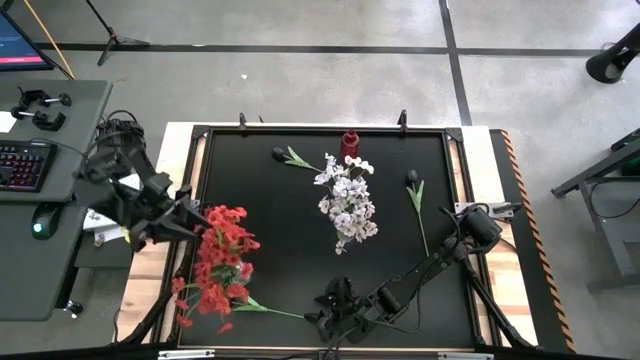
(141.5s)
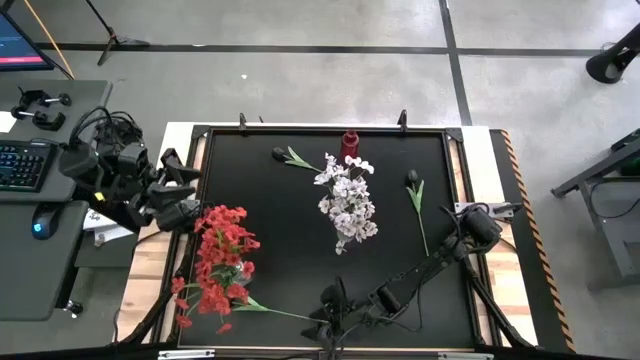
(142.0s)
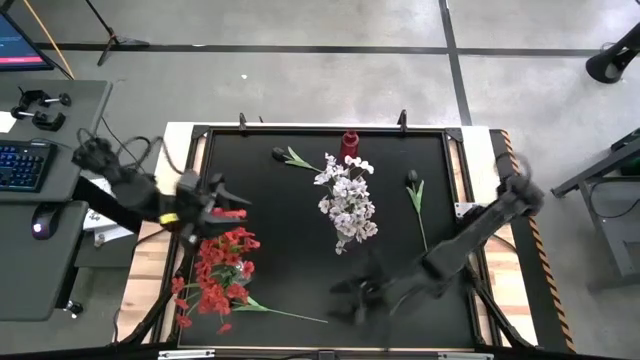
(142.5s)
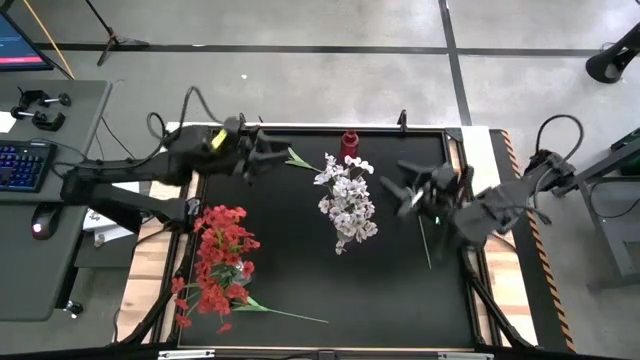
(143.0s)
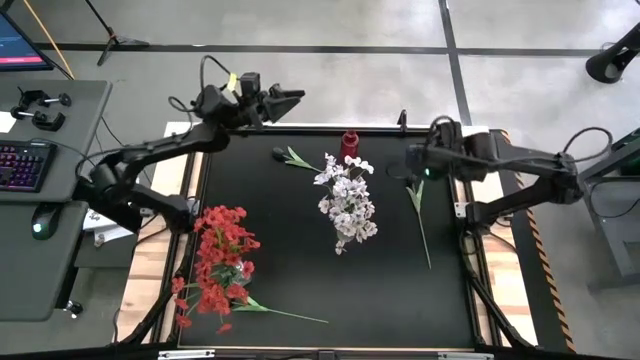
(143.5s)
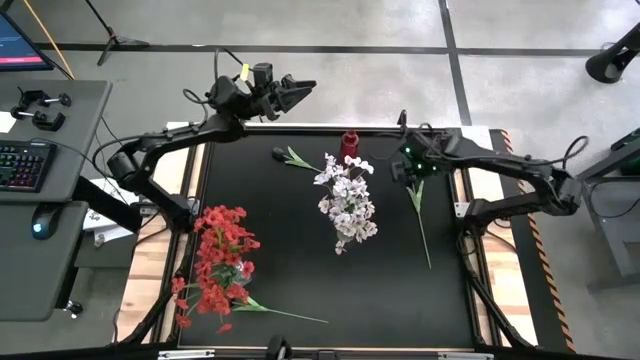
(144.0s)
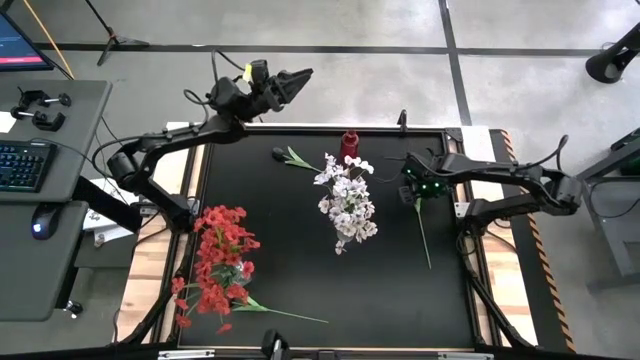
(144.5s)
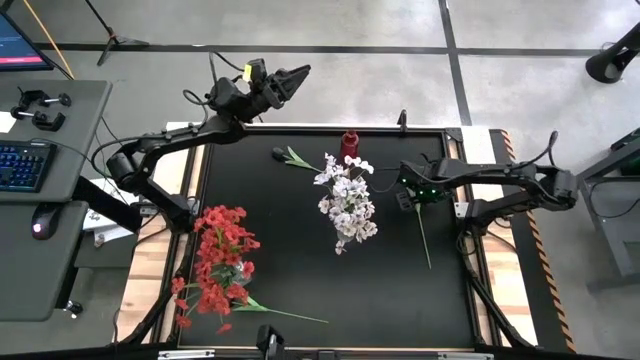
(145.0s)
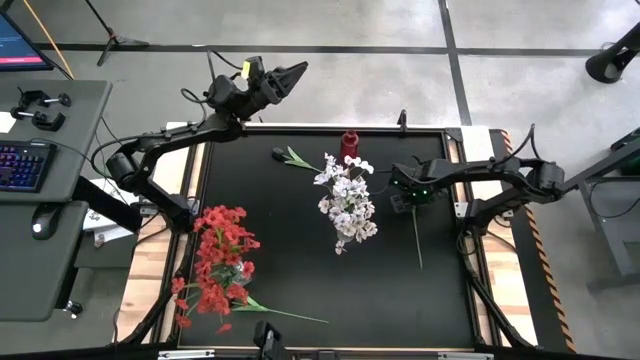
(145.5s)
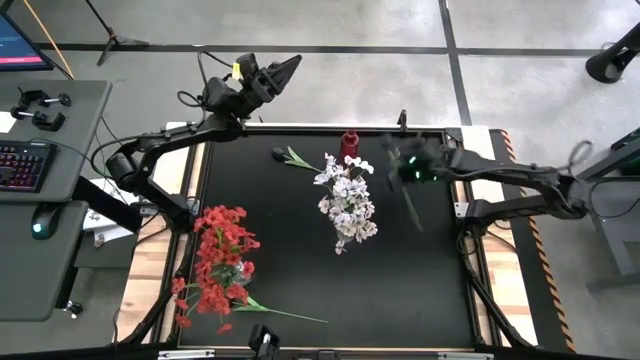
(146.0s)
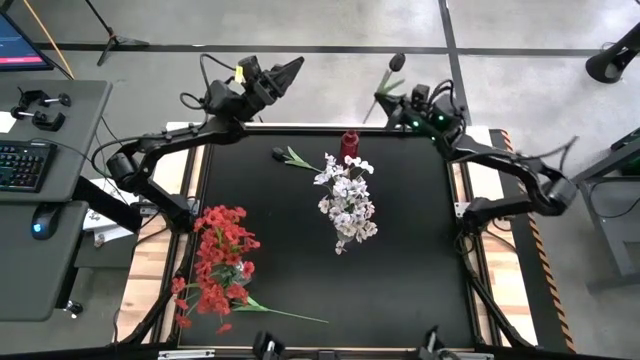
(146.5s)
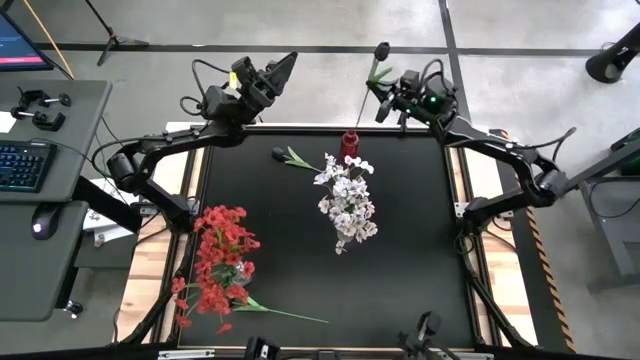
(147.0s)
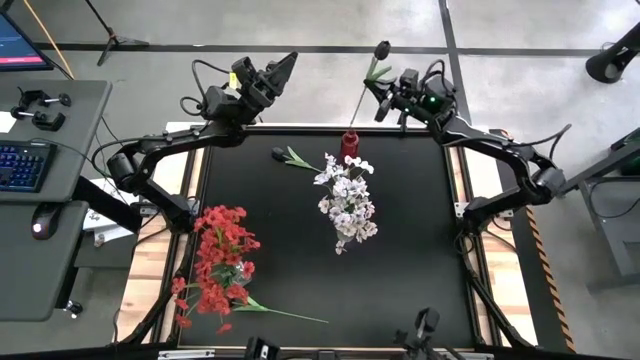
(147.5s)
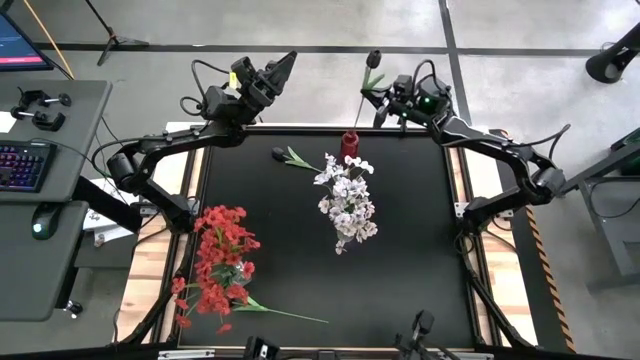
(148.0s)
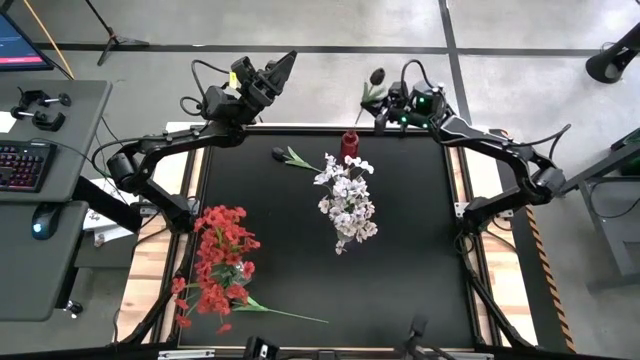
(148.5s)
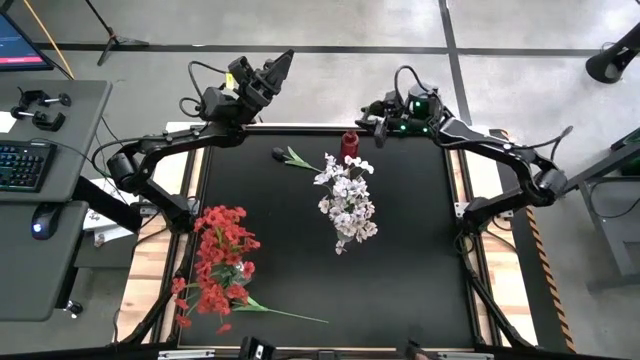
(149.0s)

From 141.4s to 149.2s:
Task: Sort flowers into vase by color
Put the top right black tulip into the red vase

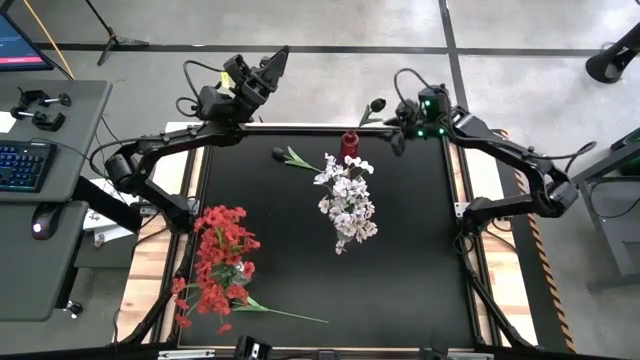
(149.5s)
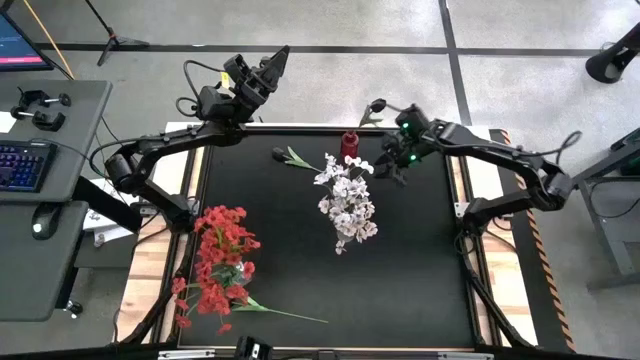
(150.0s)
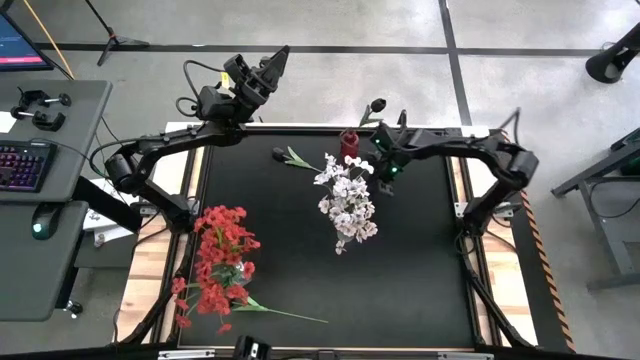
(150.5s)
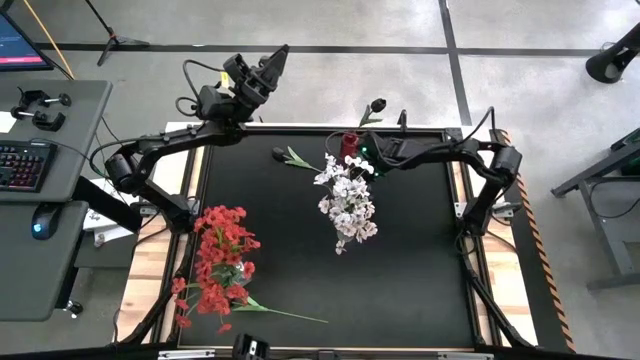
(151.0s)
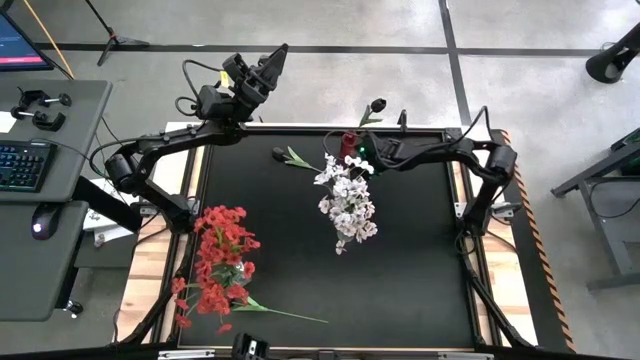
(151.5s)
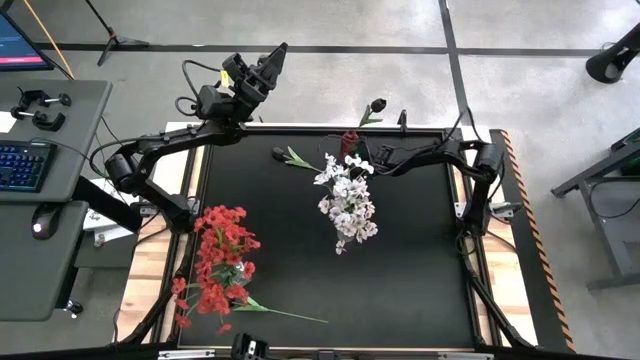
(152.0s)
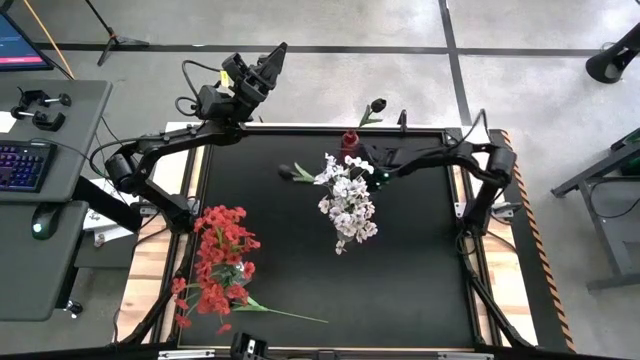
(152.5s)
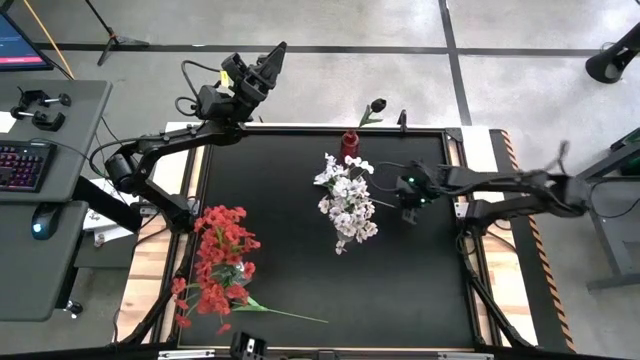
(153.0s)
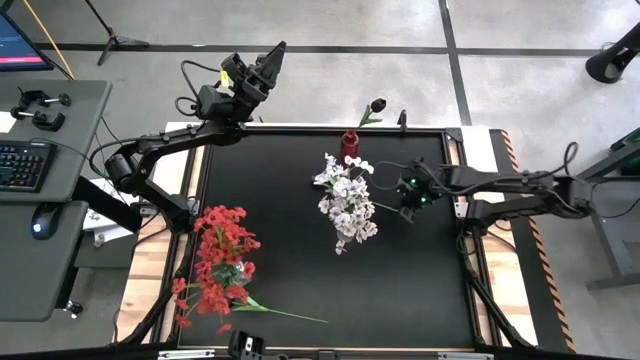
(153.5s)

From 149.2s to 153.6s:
Put the top black tulip into the red vase

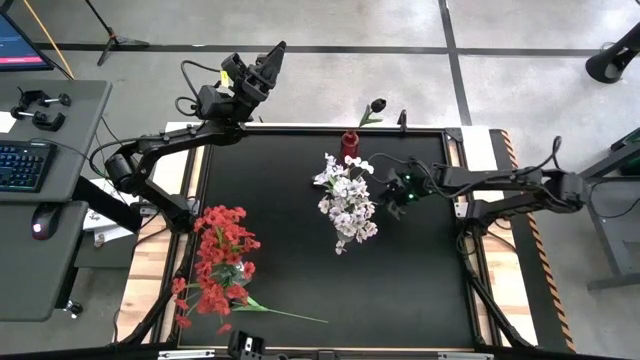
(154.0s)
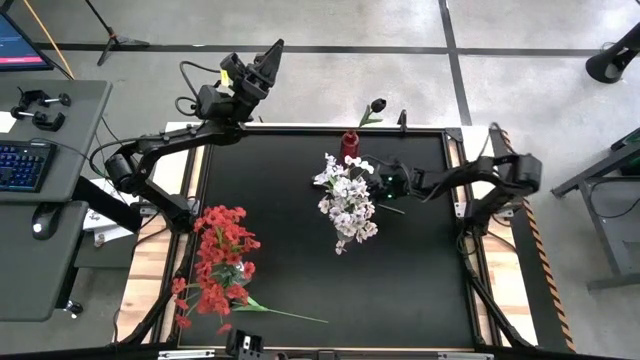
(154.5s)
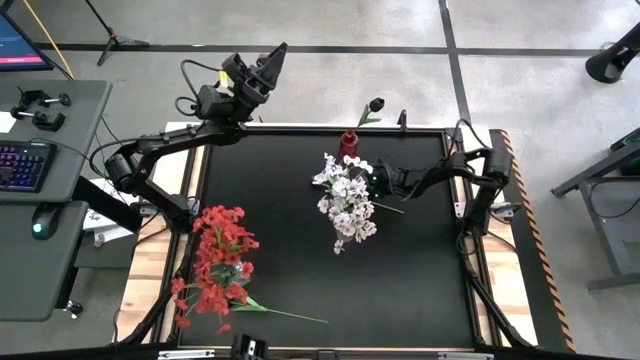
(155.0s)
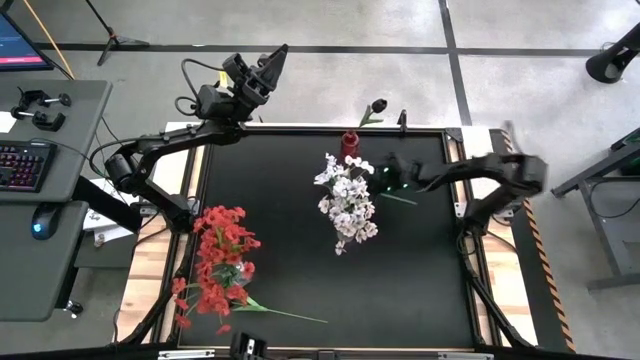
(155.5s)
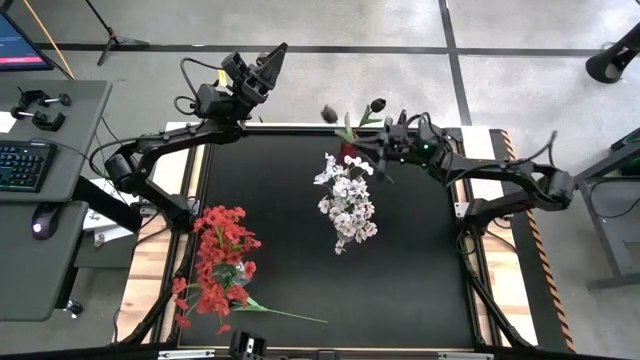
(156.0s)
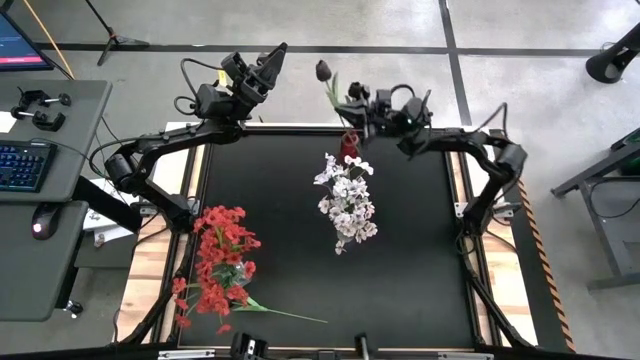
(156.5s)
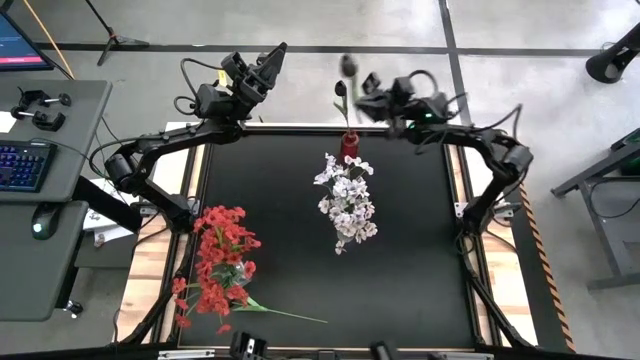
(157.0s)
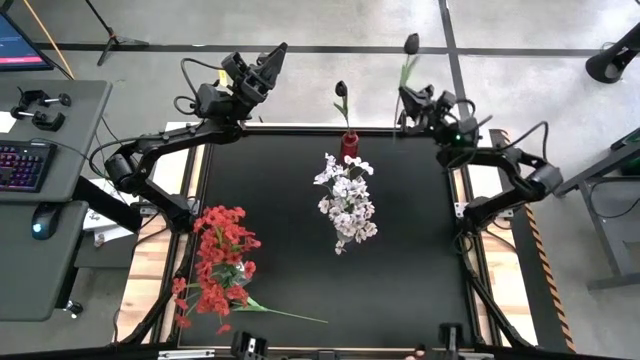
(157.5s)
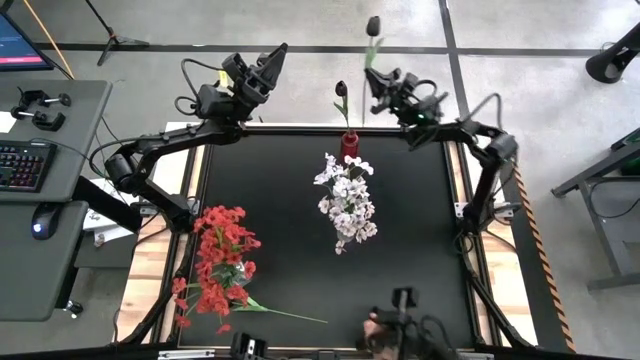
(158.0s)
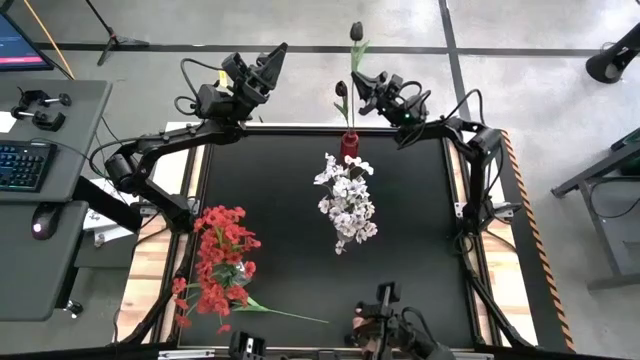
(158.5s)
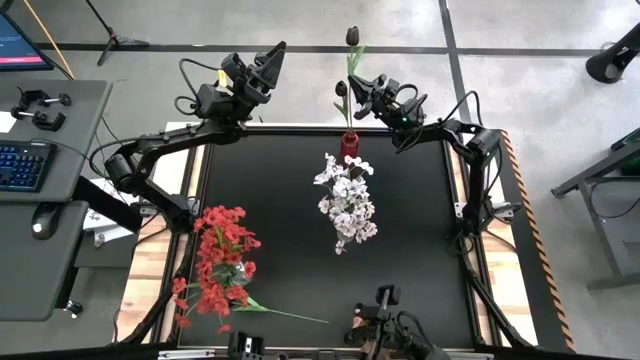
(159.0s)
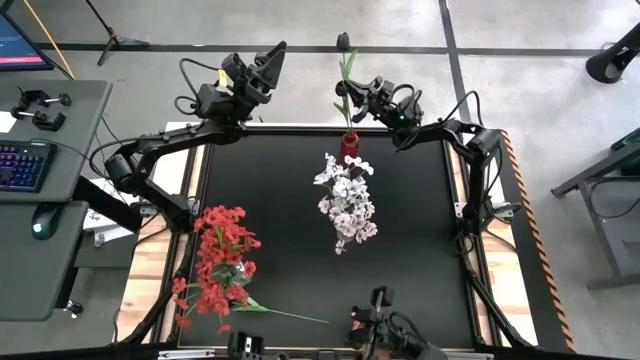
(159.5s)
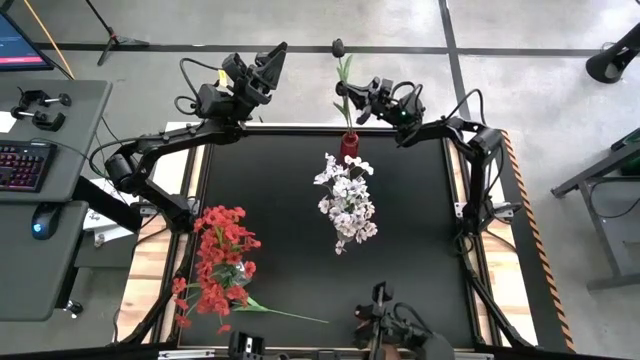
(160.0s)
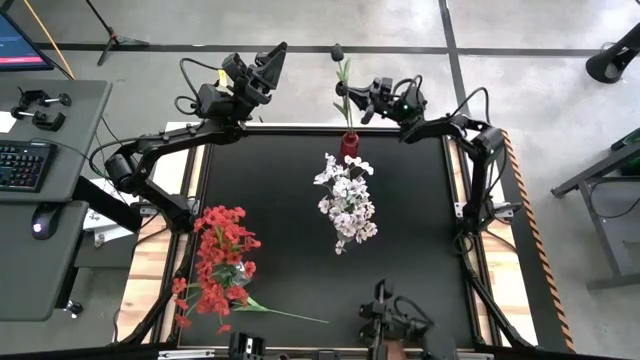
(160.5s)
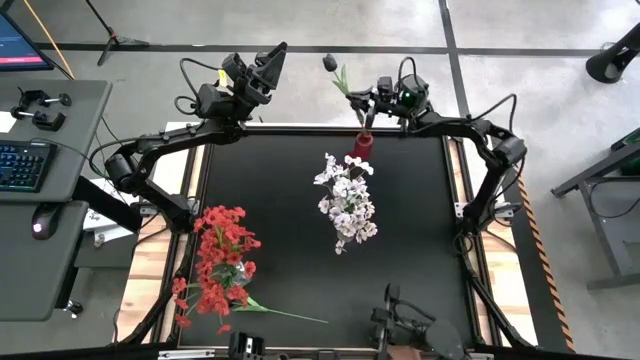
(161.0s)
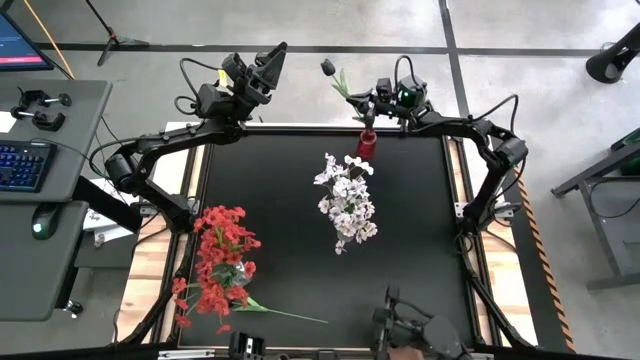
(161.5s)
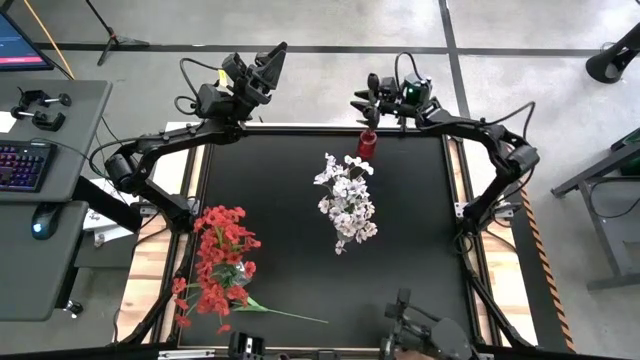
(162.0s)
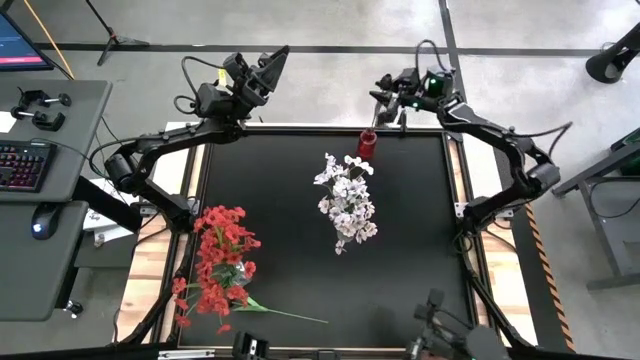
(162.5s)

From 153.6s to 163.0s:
Put the top black tulip into the red vase
